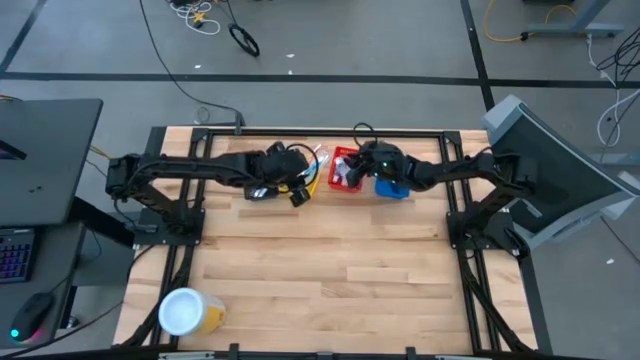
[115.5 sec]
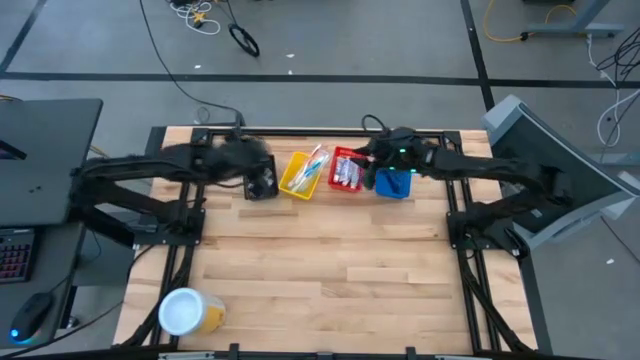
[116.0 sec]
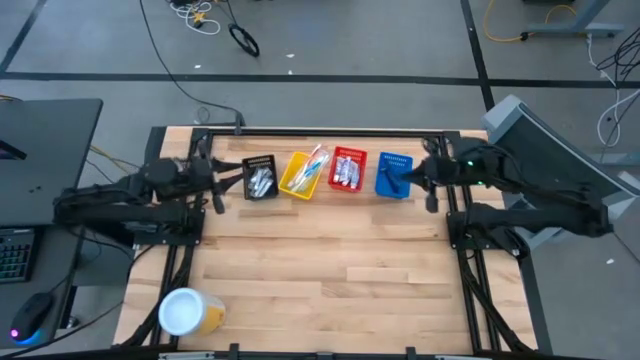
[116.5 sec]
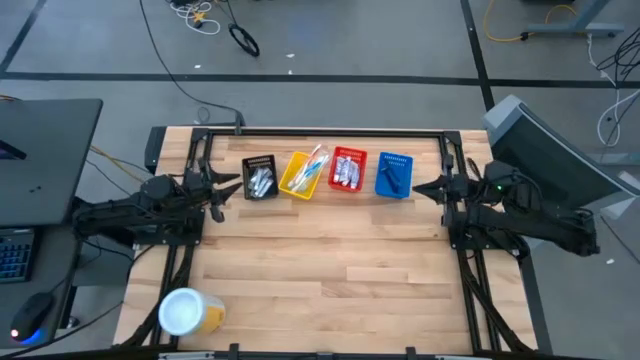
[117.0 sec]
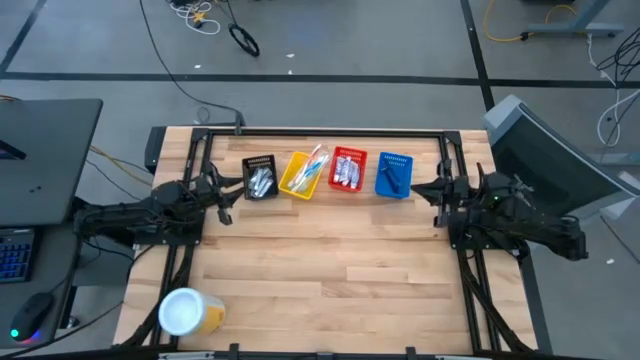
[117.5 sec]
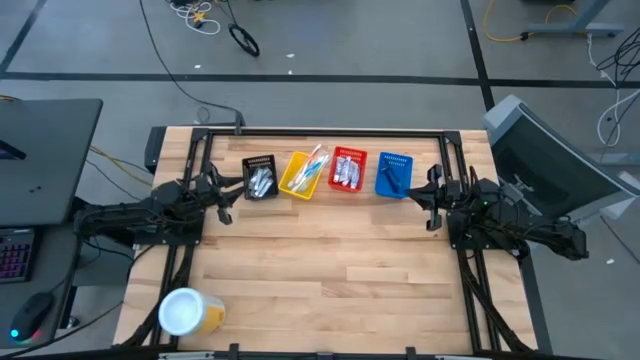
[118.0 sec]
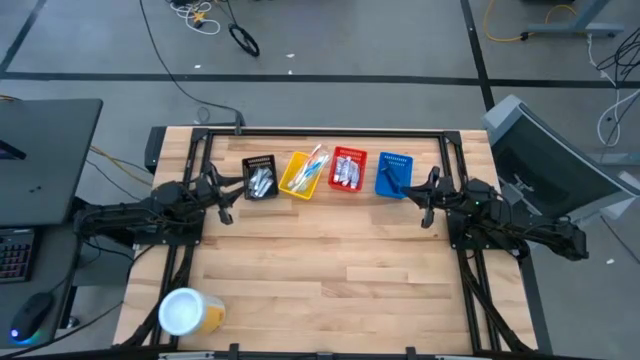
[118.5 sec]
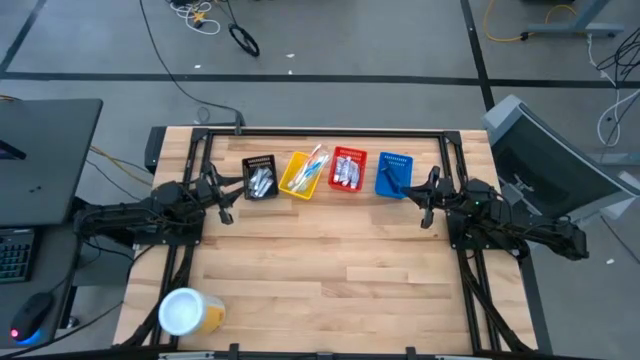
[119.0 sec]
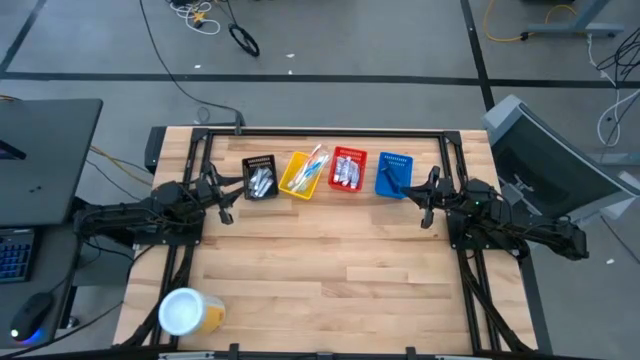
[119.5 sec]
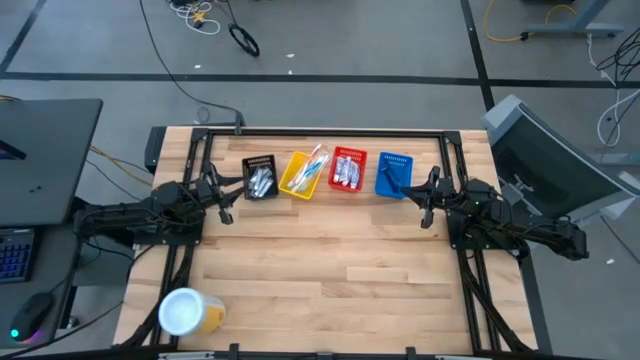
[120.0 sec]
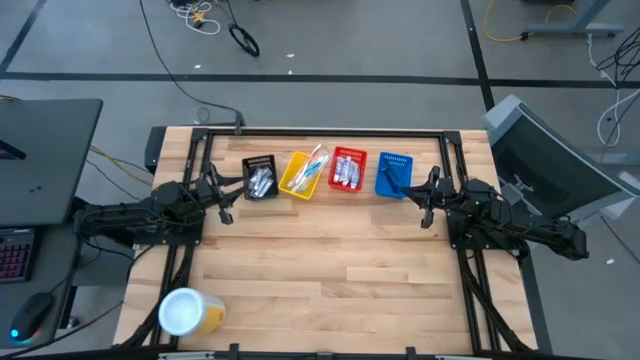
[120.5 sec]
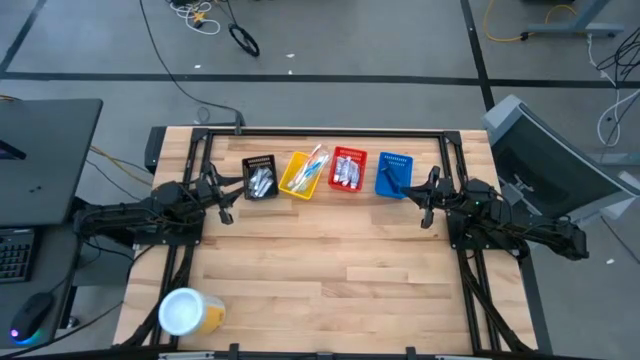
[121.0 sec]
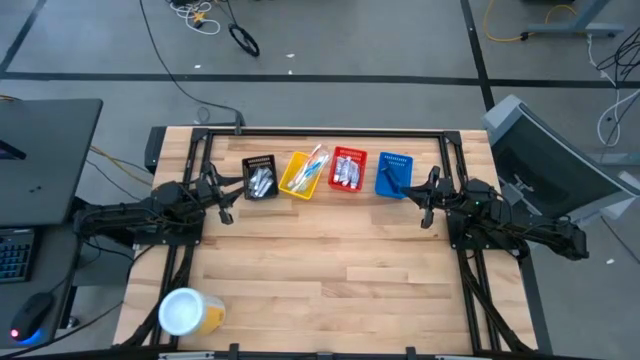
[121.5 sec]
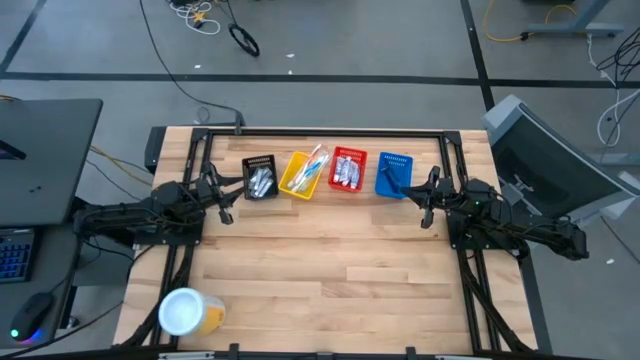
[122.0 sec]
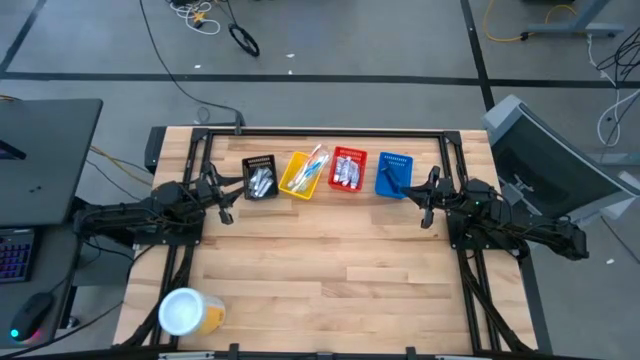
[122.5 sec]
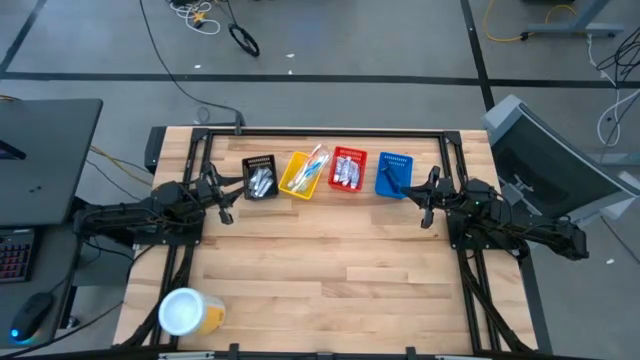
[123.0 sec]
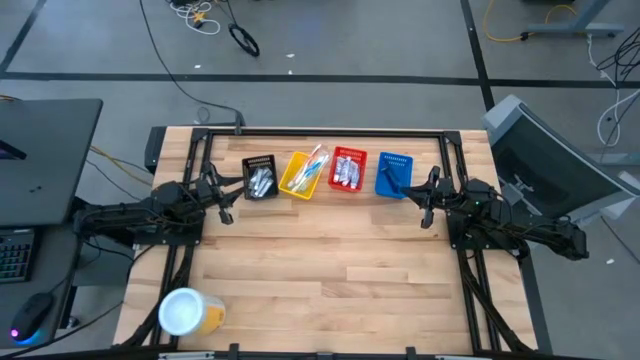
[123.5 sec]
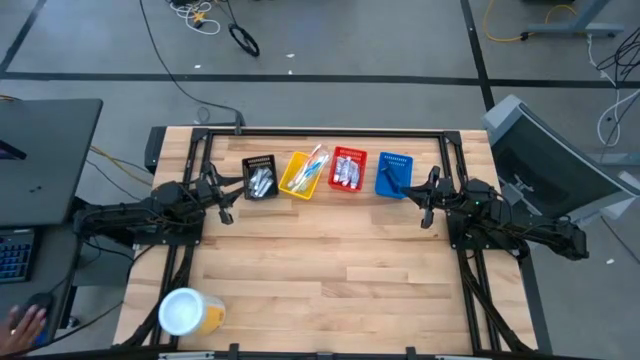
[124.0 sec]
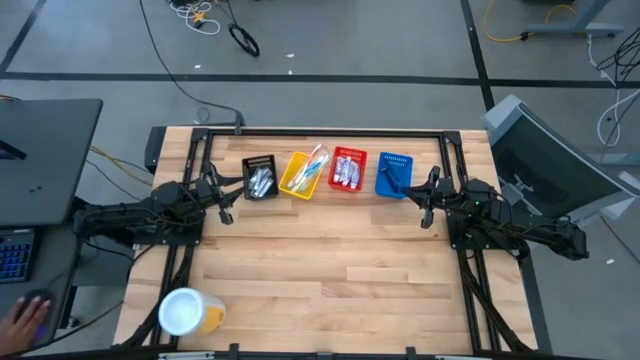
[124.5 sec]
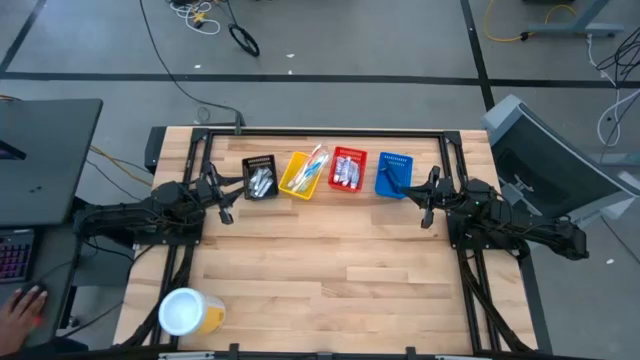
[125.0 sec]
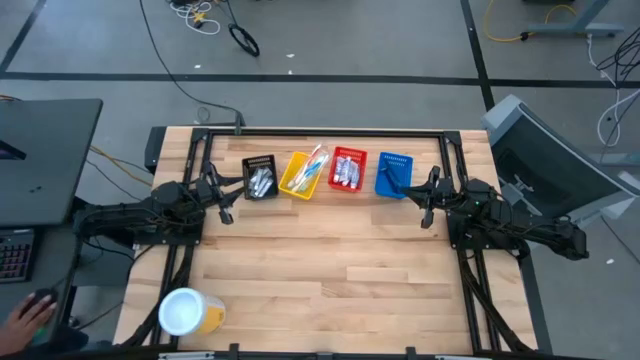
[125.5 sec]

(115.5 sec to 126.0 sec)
Task: Pick & Place Travel size toiletries
Return to Home Position

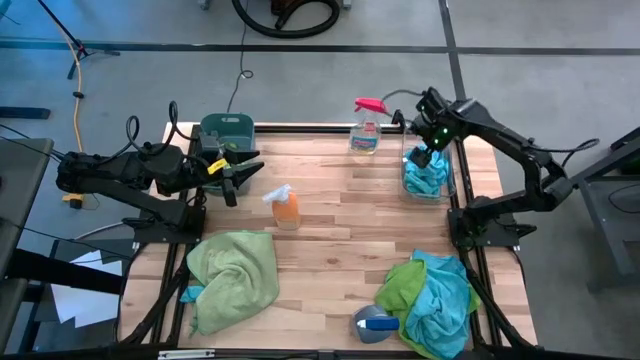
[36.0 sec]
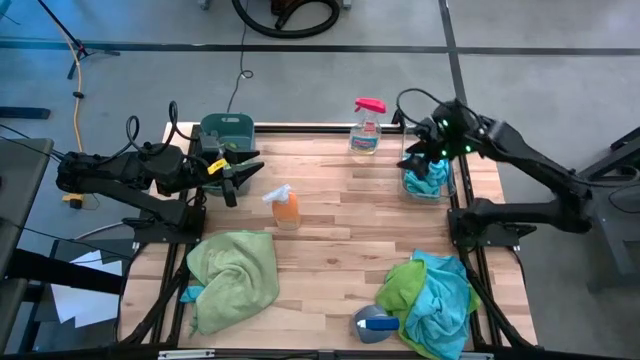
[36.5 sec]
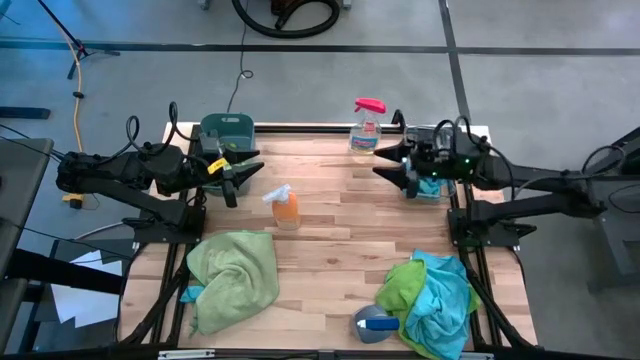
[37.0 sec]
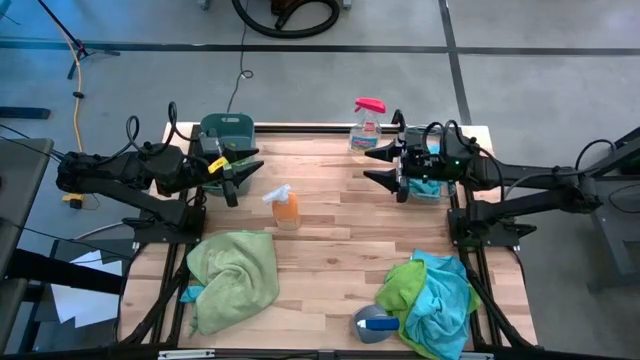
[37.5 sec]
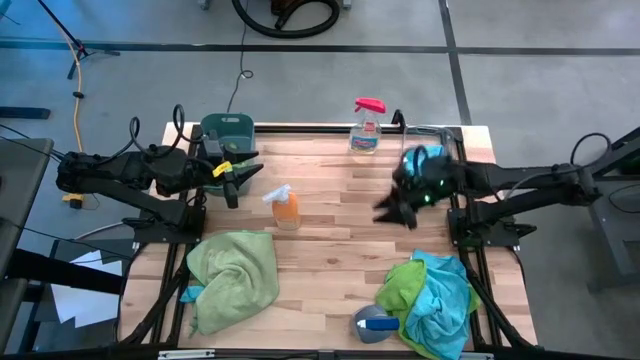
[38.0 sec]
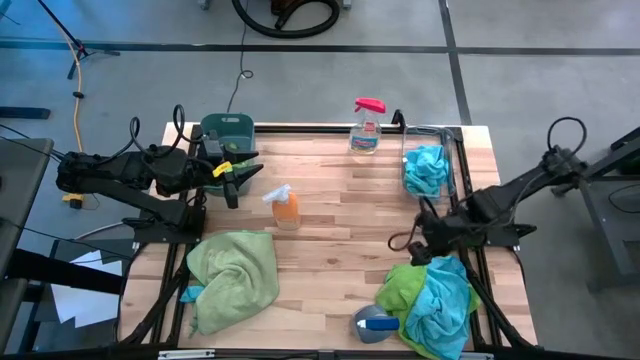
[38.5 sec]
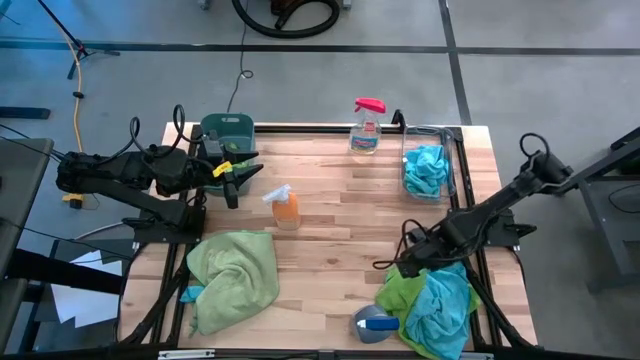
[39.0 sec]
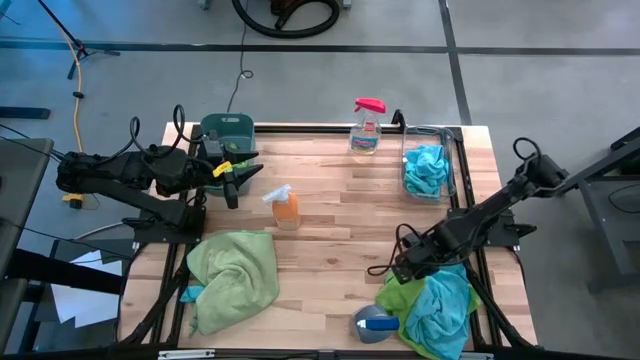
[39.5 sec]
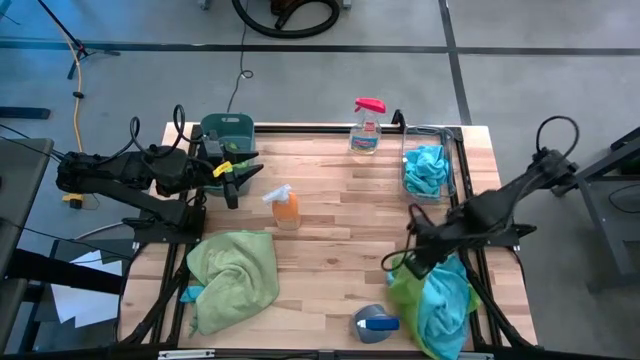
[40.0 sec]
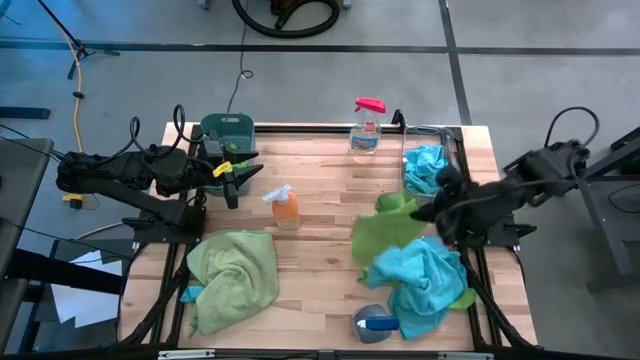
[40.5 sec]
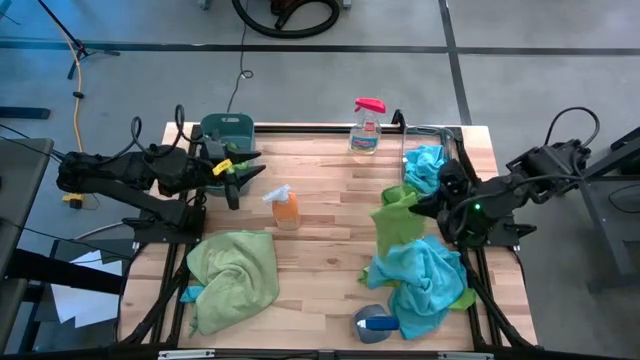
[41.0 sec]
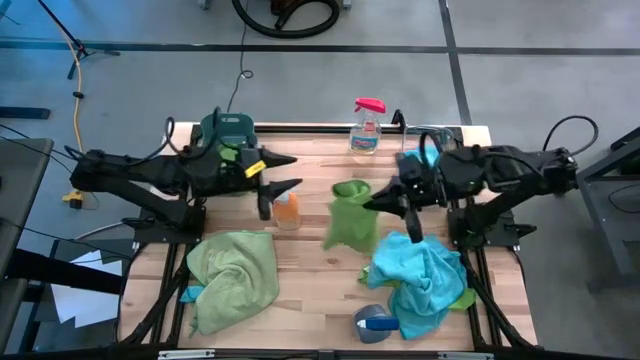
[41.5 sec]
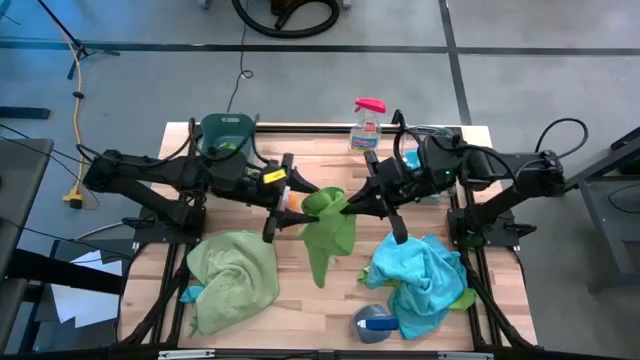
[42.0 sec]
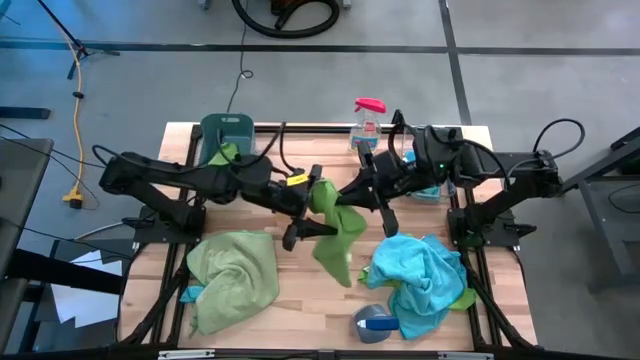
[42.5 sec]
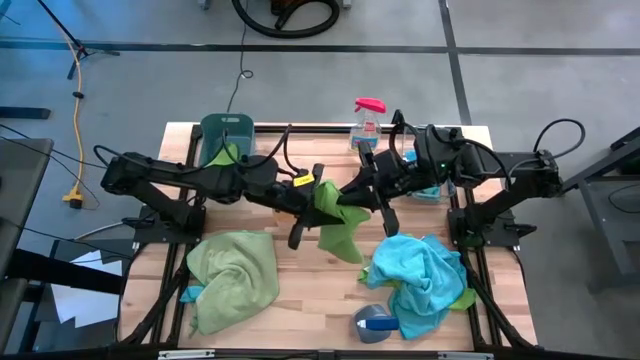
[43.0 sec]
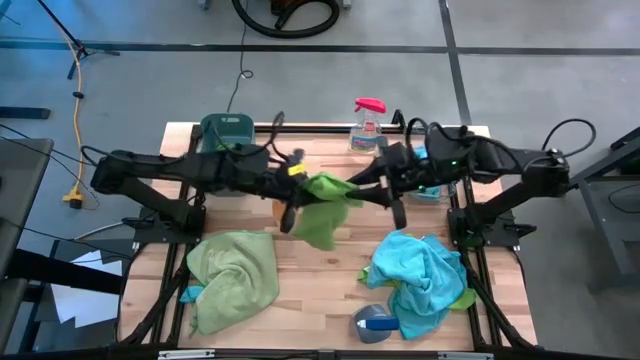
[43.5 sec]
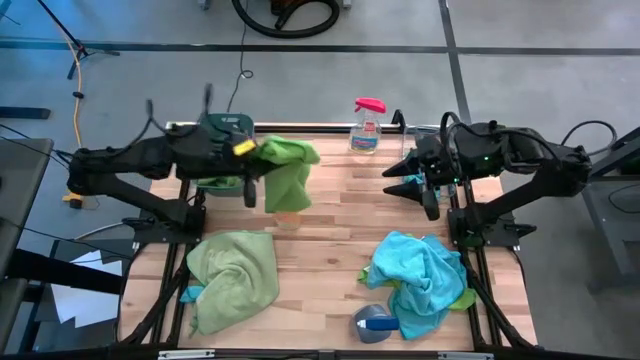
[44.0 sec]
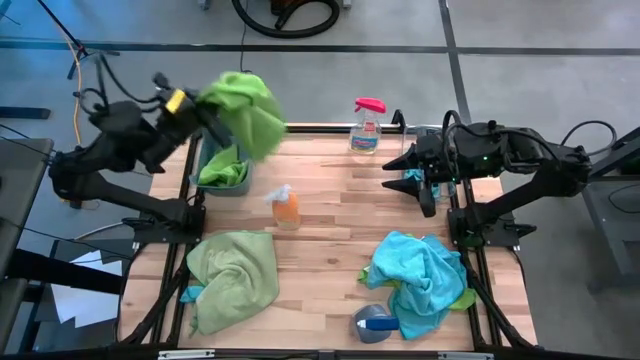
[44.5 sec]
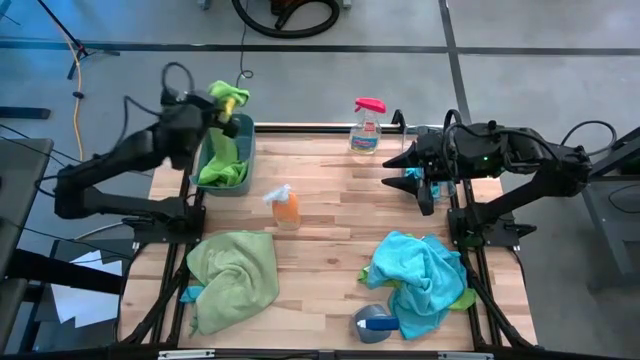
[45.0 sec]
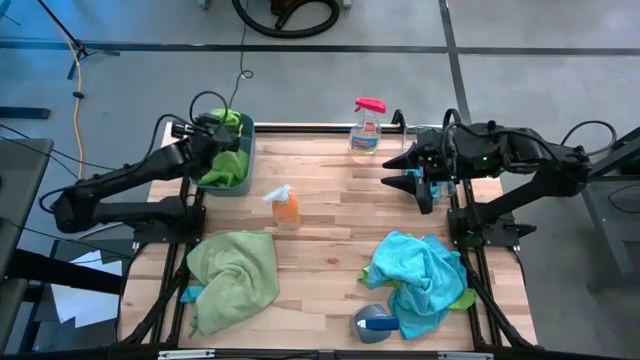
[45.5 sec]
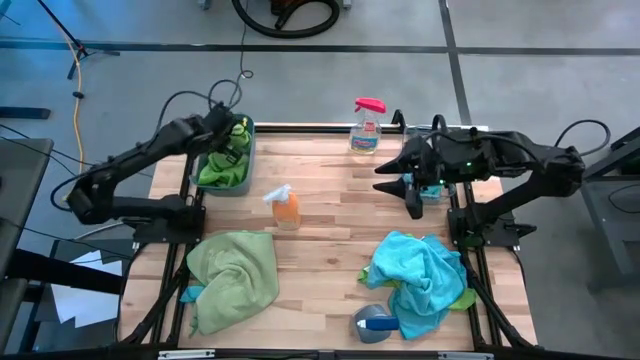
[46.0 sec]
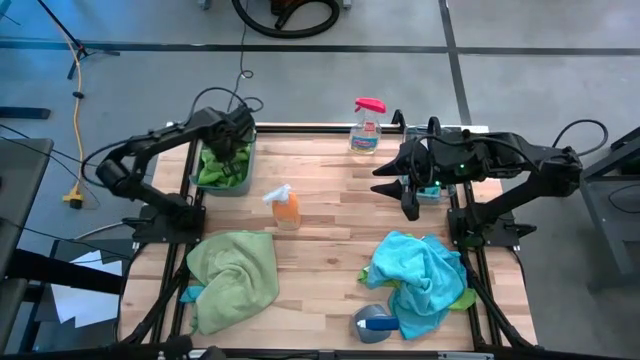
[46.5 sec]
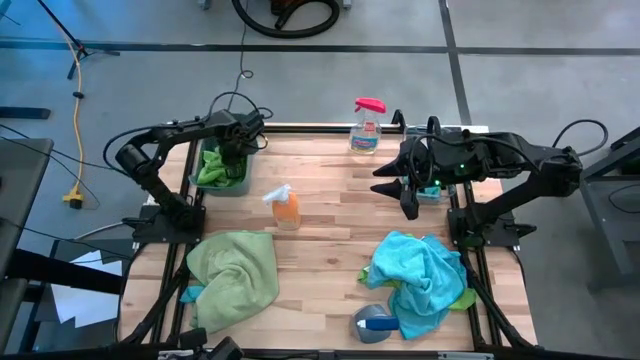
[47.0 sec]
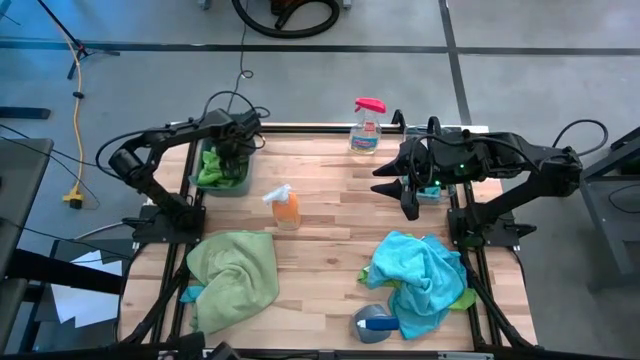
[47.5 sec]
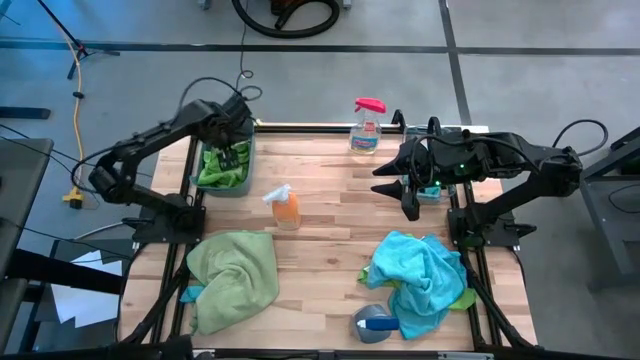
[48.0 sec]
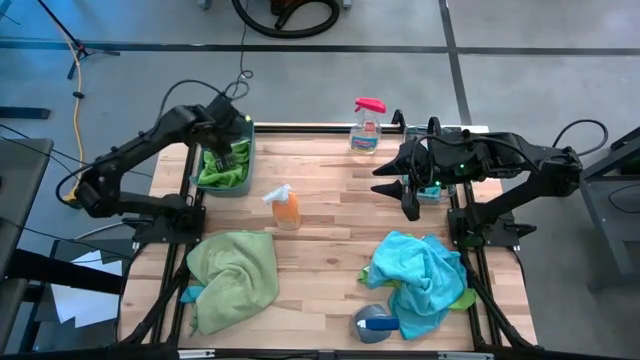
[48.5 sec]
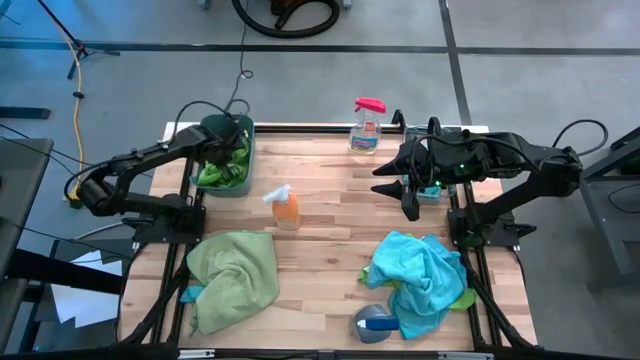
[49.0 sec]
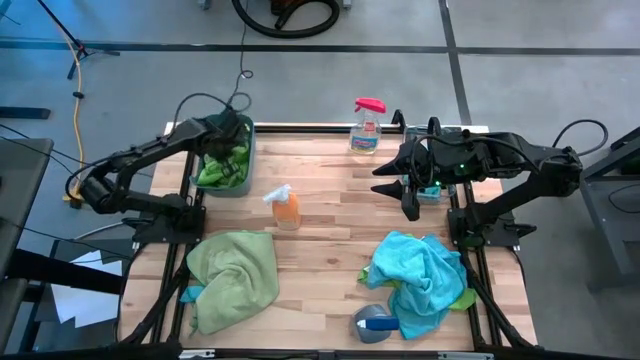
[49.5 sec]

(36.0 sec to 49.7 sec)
Task: Sort microfiber towel by color & place in baskets
Put the green microfiber towel into the green bin
